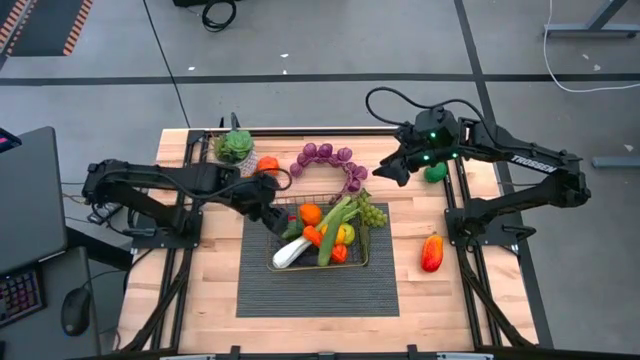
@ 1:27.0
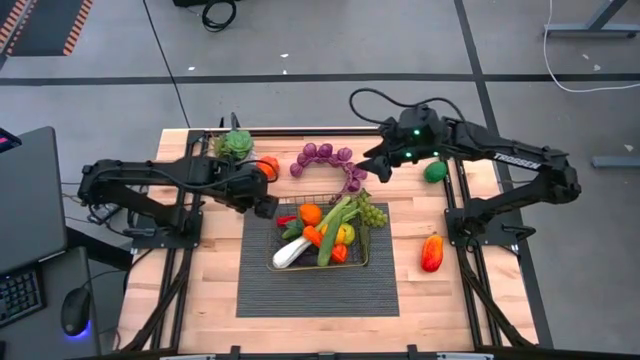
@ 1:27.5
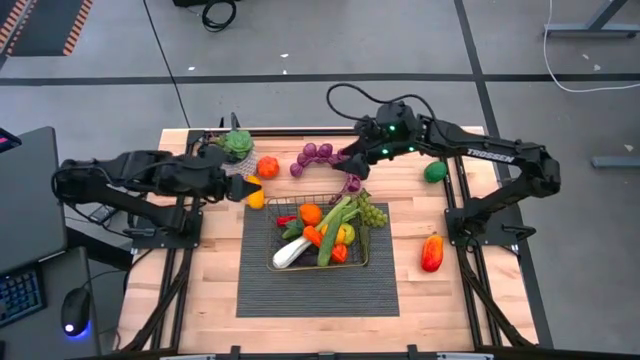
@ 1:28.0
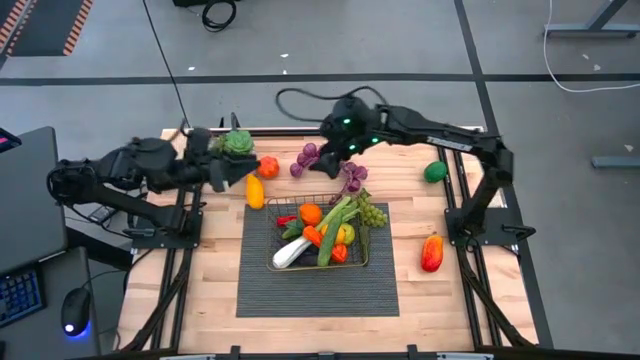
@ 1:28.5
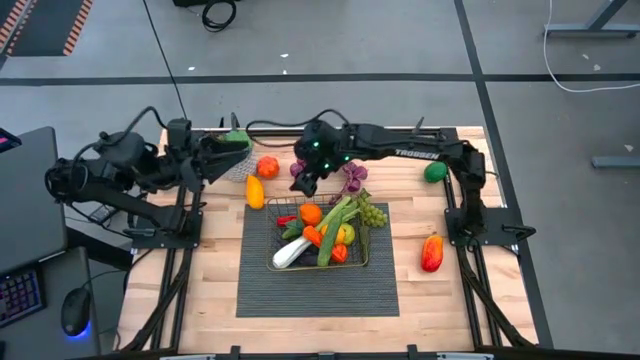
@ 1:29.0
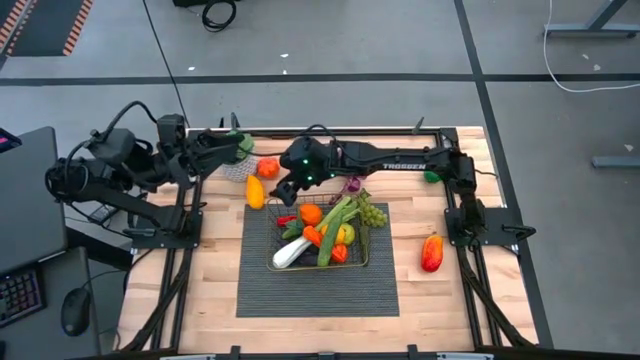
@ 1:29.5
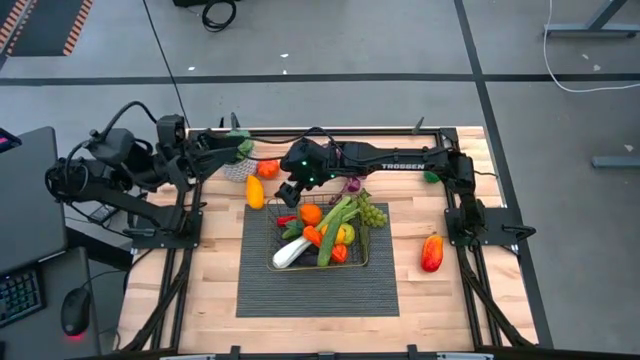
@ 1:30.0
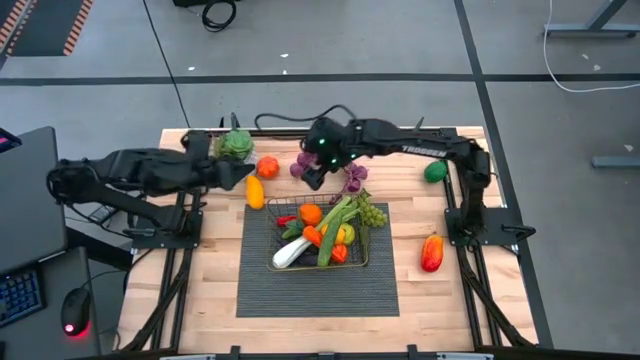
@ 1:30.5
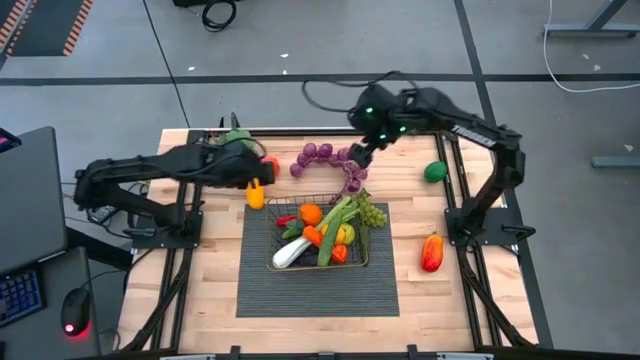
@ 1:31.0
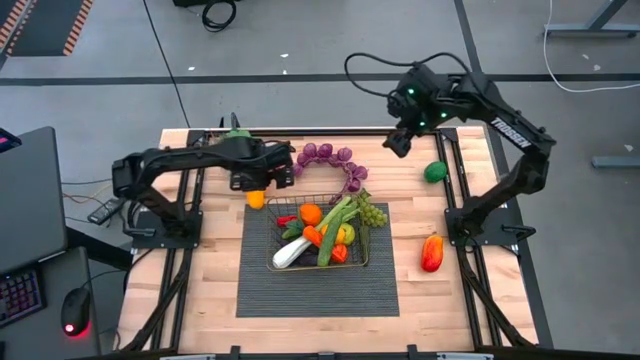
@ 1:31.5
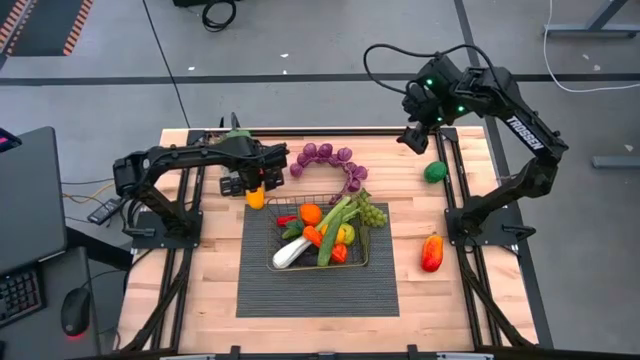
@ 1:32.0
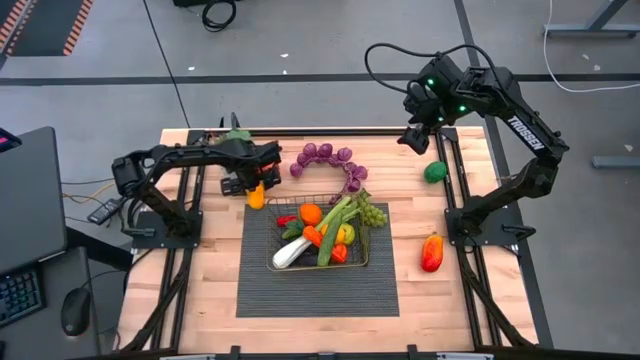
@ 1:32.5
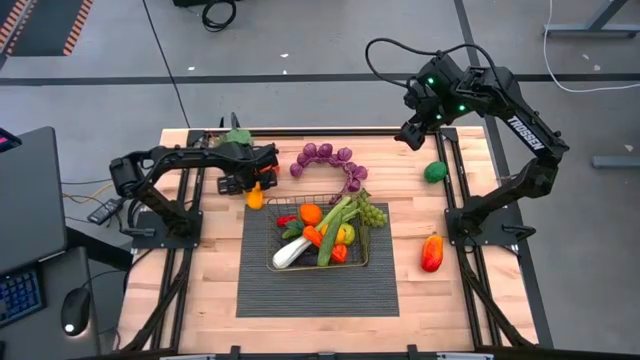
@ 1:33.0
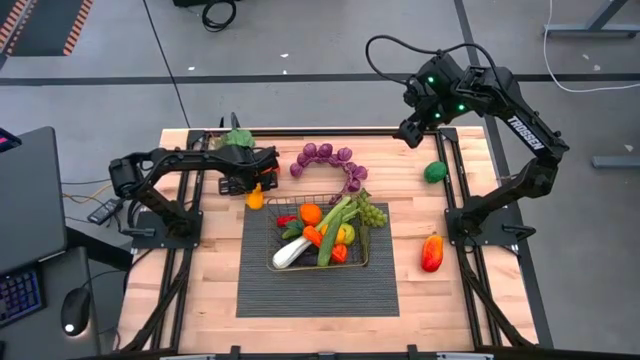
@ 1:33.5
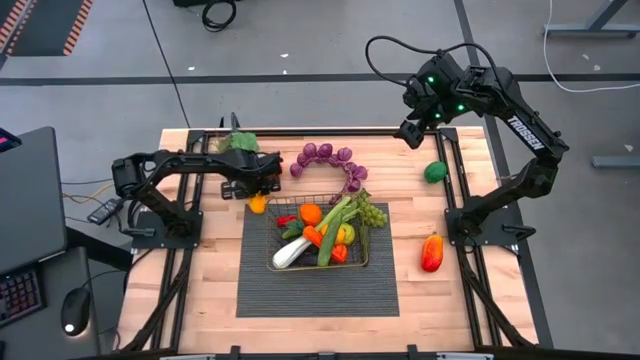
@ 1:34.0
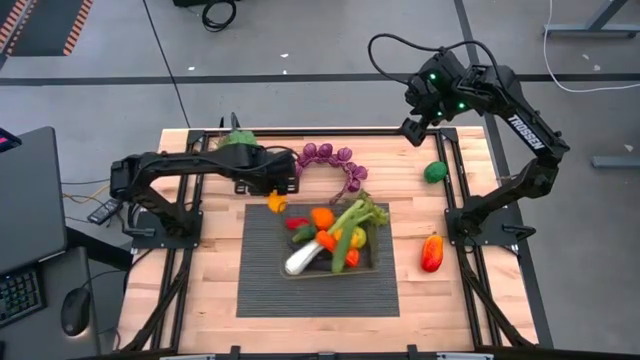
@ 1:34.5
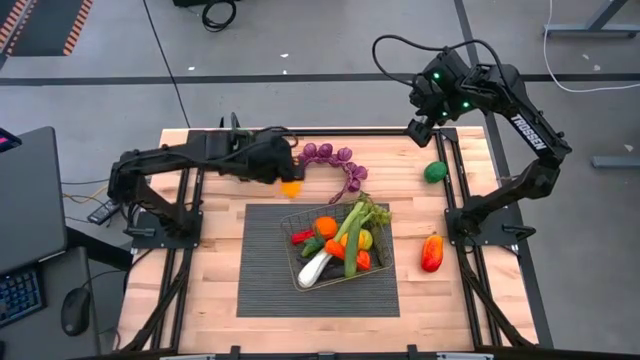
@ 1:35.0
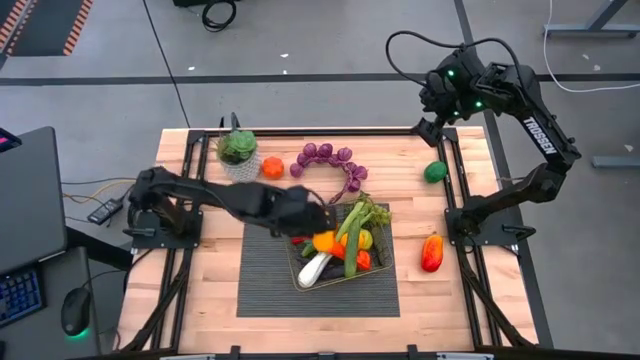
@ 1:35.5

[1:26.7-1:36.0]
Task: Build produce basket
Put the yellow mango into the gold wire basket

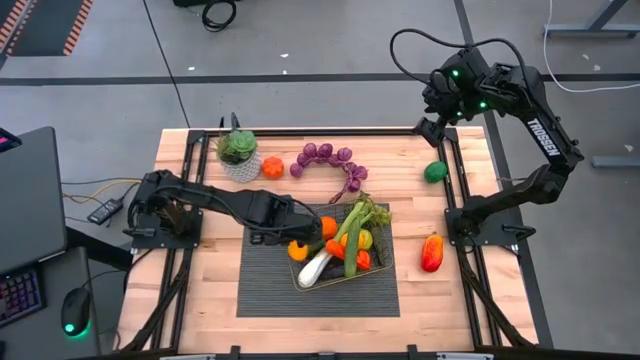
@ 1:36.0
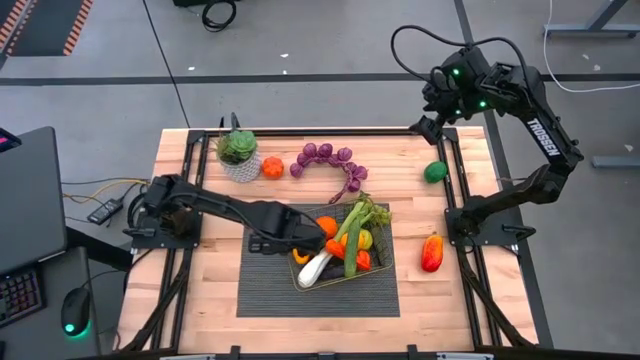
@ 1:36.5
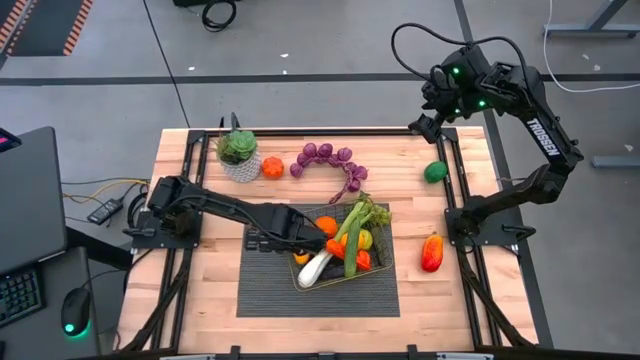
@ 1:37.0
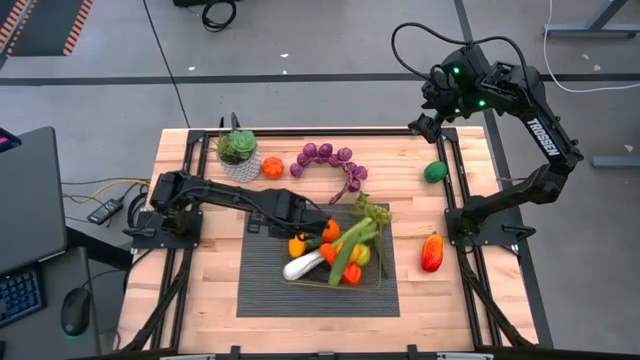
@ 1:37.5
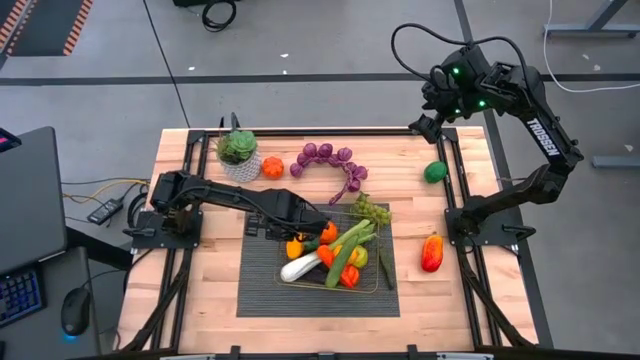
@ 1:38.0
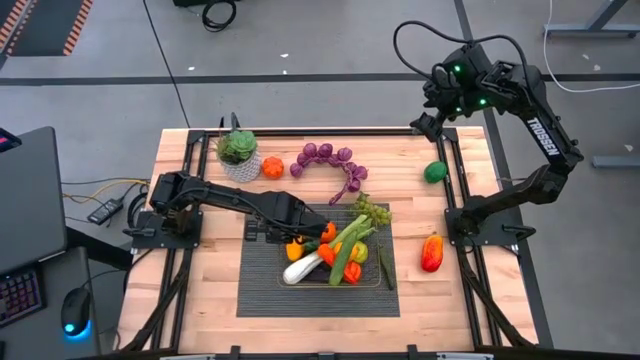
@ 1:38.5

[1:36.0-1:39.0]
Adjust the gold wire basket on the gray mat

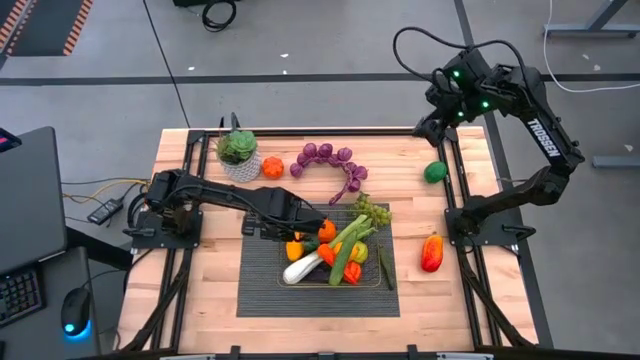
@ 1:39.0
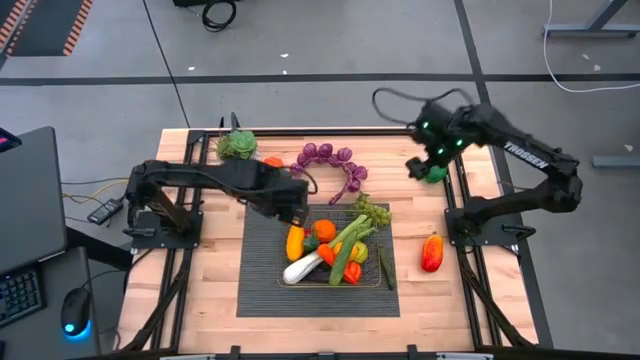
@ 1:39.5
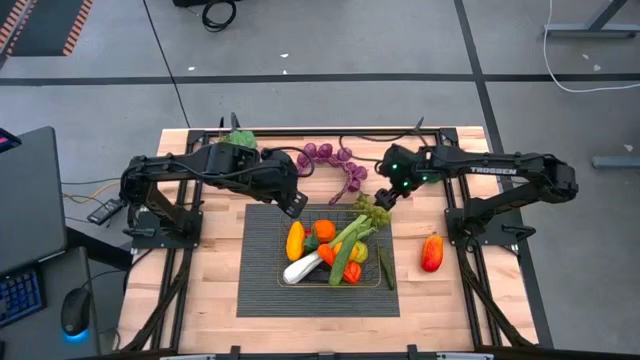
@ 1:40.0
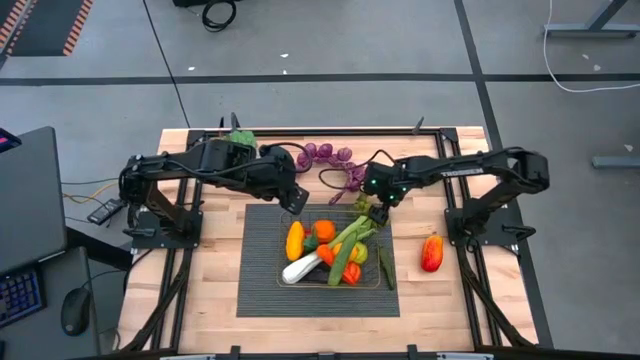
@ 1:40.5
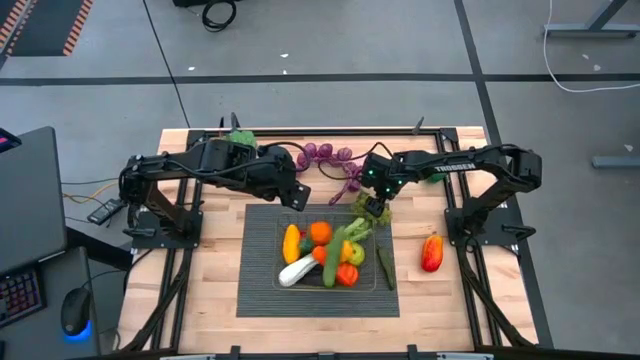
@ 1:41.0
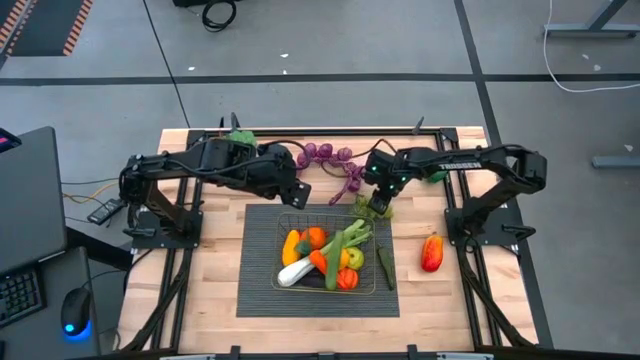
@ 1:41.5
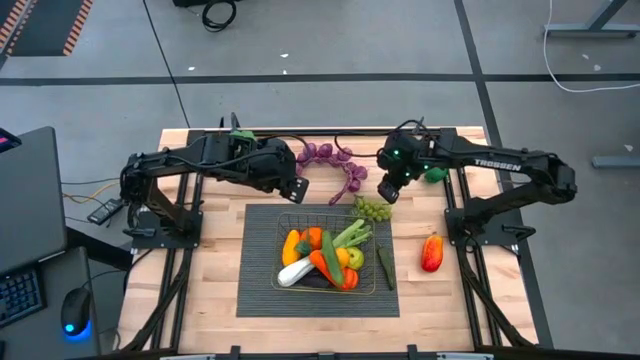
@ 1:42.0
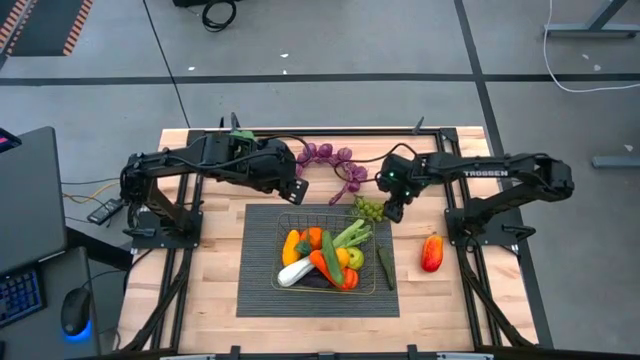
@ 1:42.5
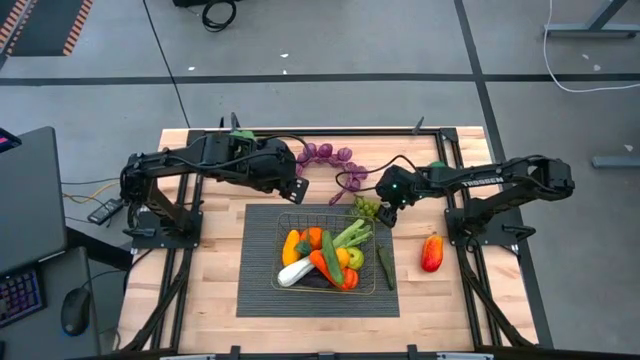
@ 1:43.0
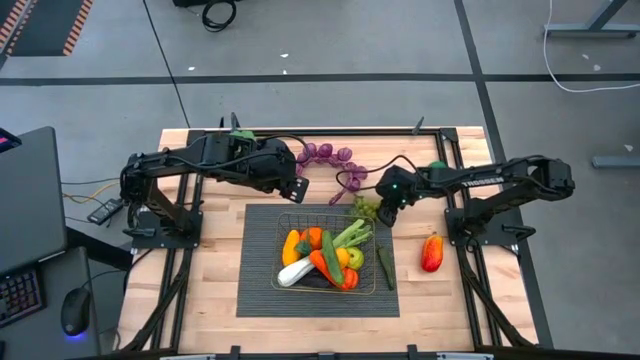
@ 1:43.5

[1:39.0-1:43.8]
Put the green grapes into the gold wire basket

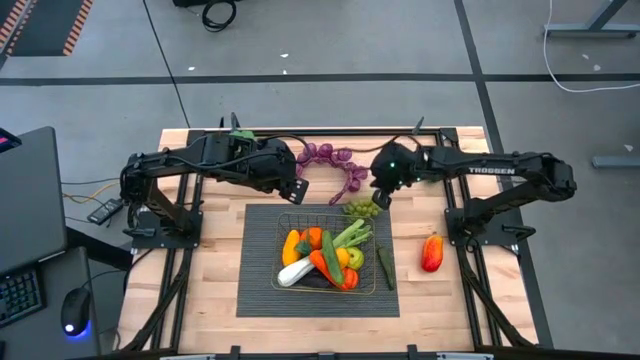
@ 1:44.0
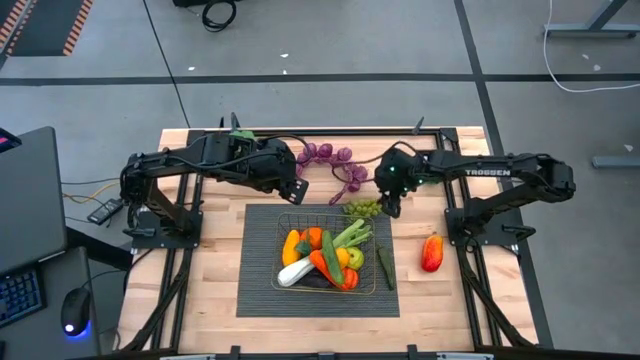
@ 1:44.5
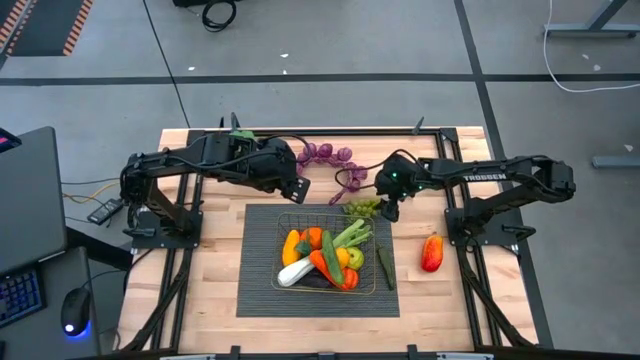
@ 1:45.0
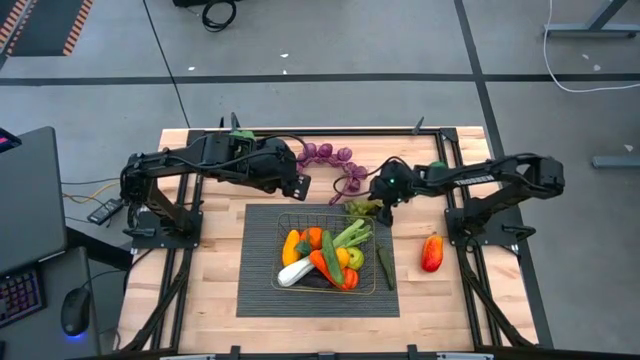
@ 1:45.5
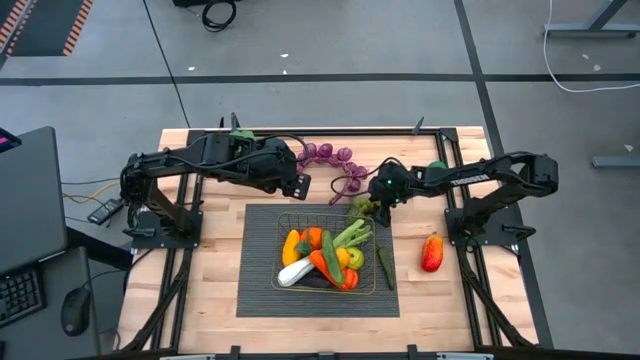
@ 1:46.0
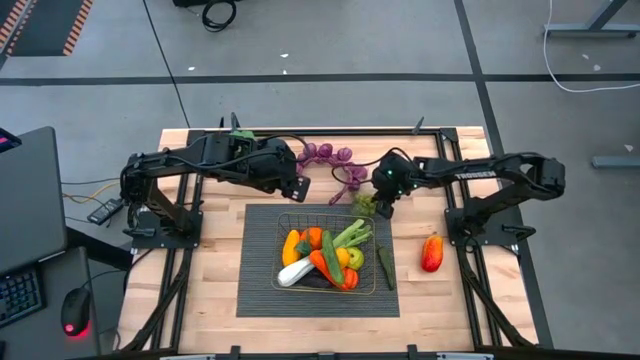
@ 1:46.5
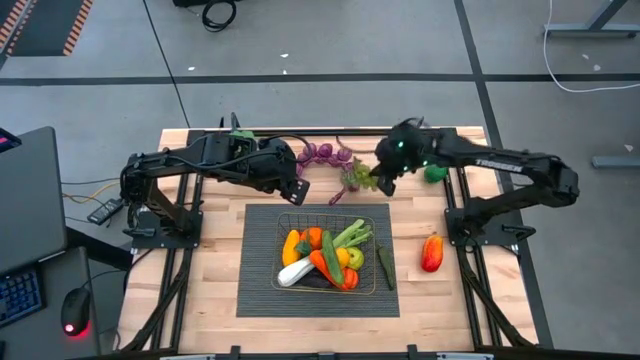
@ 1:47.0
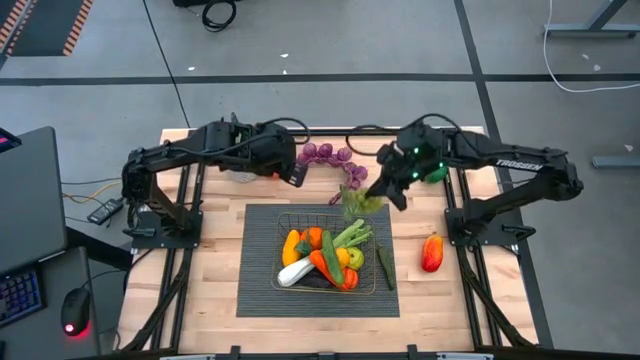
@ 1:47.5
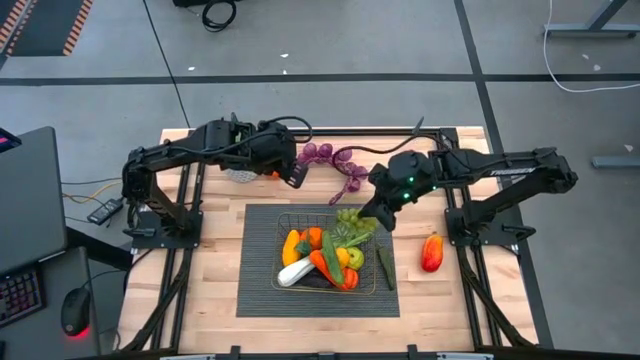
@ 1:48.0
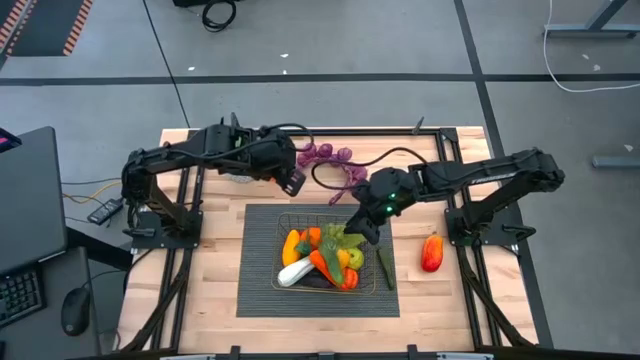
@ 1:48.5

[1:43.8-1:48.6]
Put the green grapes into the gold wire basket

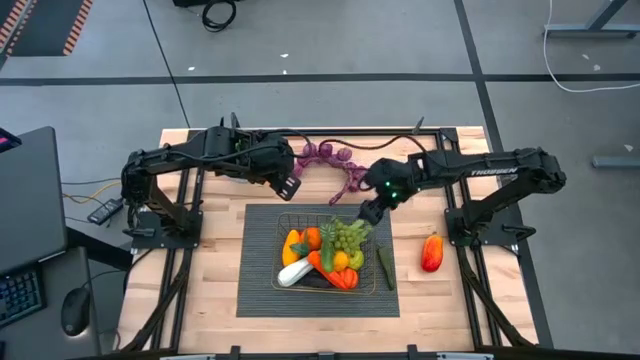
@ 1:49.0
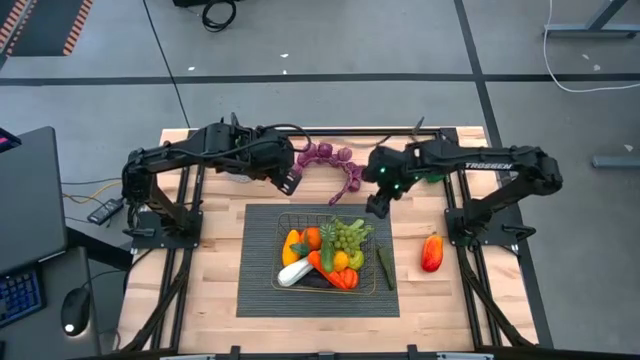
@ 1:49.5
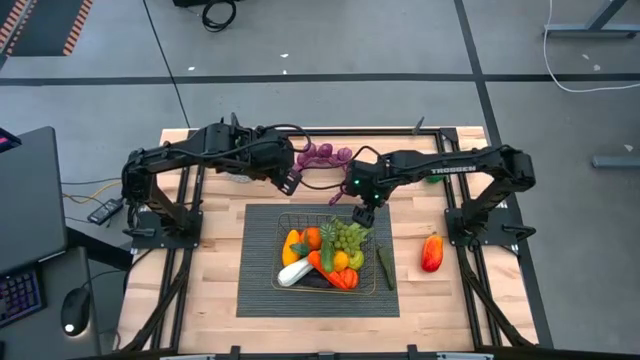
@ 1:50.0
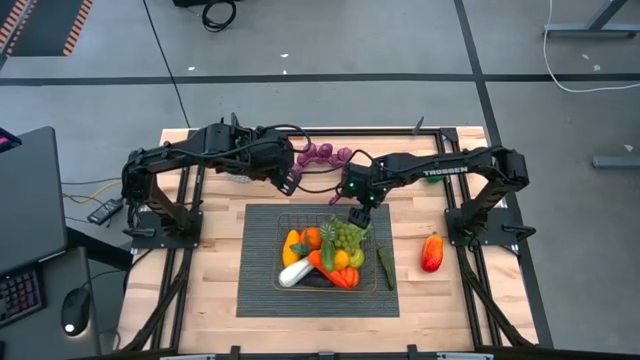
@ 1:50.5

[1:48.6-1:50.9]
Adjust the gold wire basket on the gray mat
